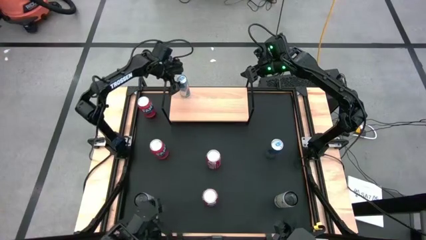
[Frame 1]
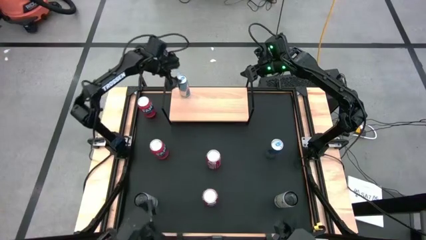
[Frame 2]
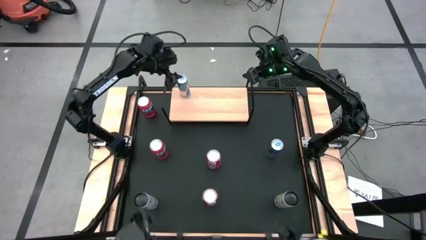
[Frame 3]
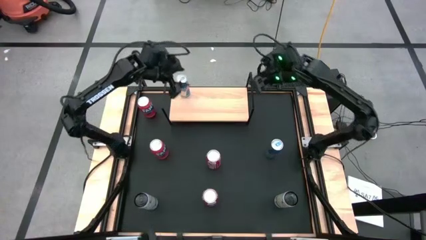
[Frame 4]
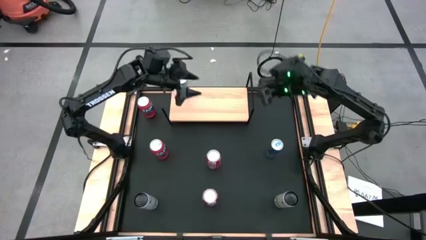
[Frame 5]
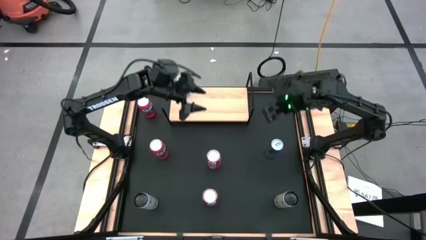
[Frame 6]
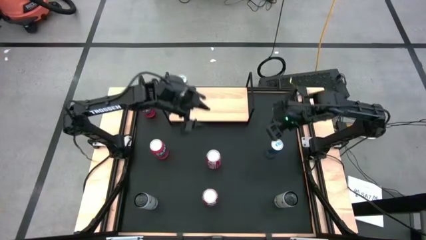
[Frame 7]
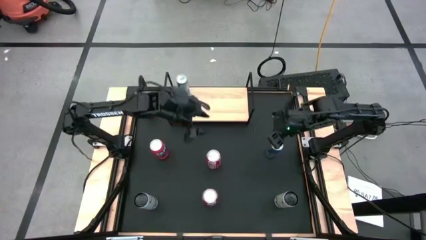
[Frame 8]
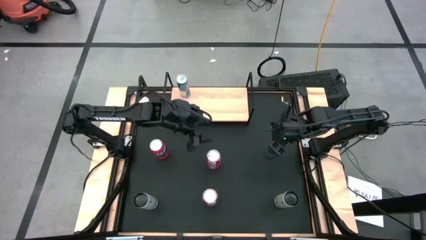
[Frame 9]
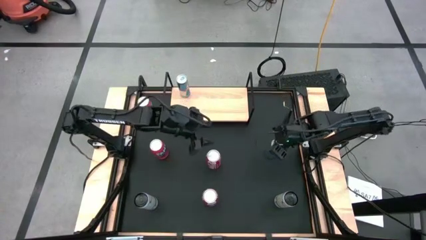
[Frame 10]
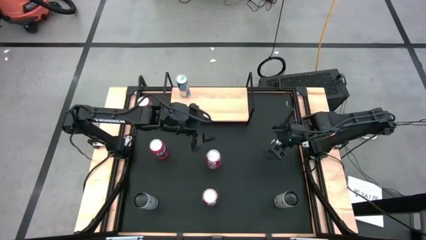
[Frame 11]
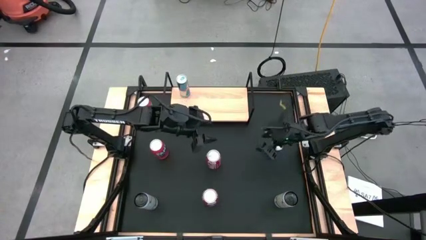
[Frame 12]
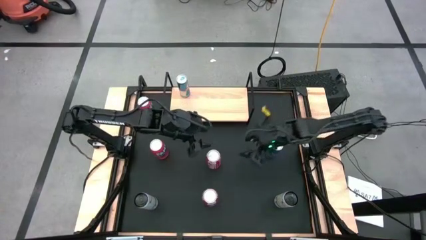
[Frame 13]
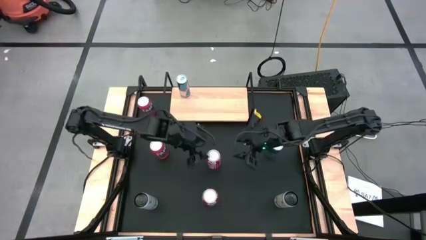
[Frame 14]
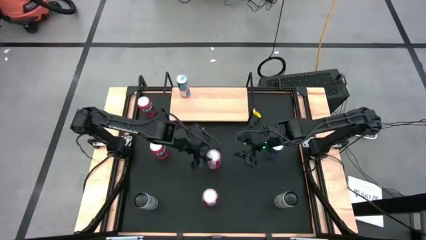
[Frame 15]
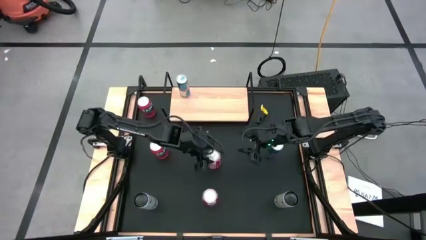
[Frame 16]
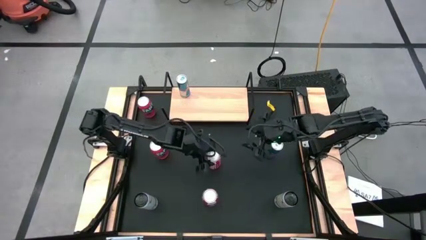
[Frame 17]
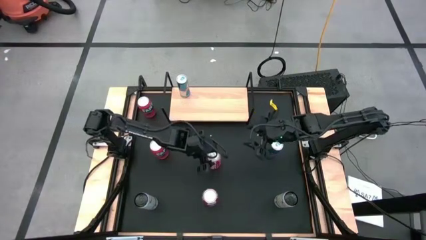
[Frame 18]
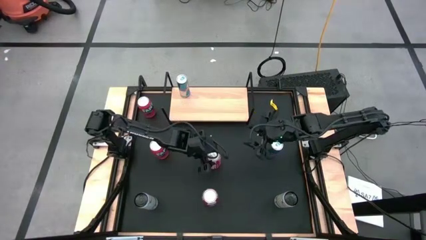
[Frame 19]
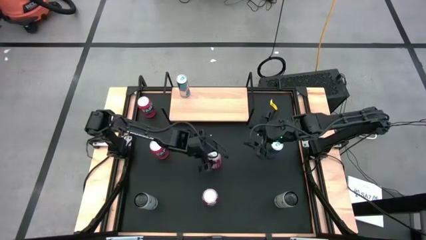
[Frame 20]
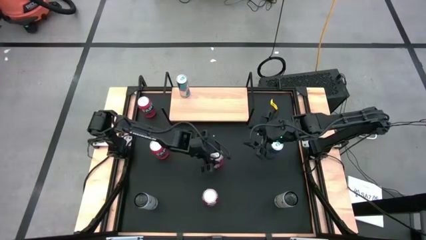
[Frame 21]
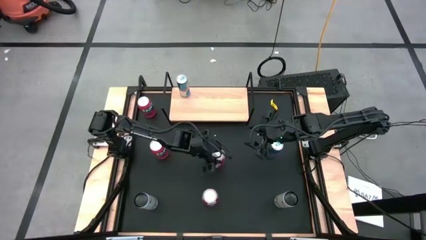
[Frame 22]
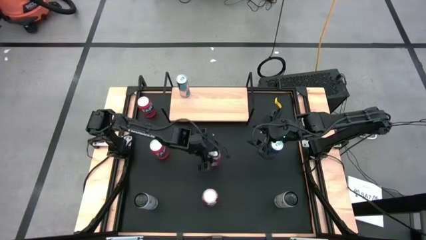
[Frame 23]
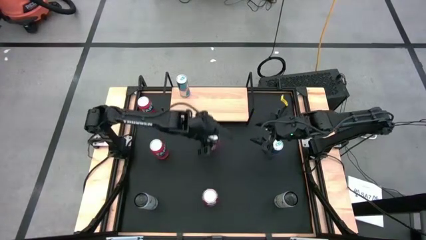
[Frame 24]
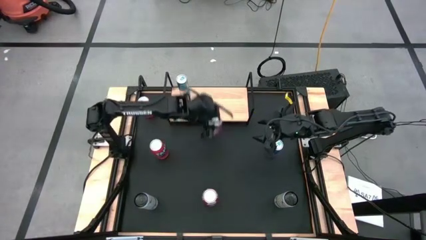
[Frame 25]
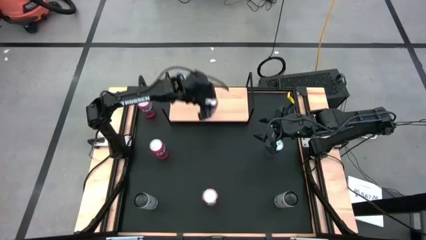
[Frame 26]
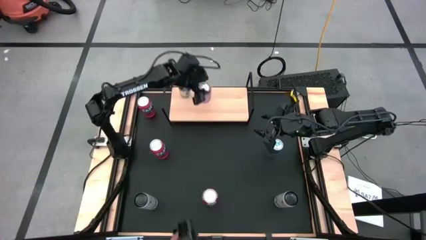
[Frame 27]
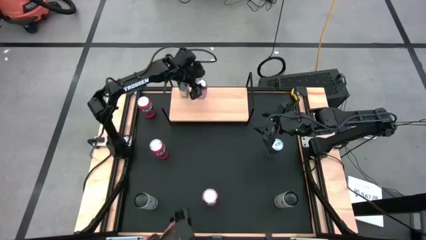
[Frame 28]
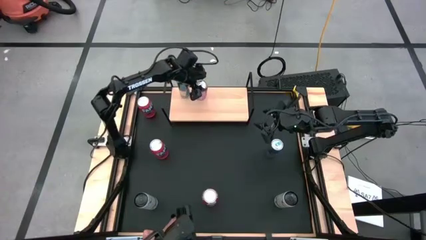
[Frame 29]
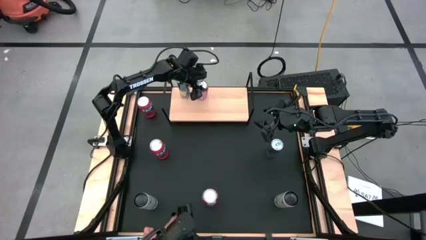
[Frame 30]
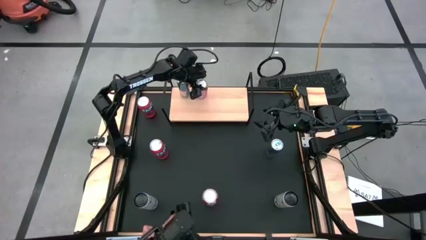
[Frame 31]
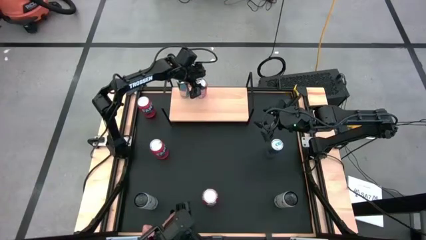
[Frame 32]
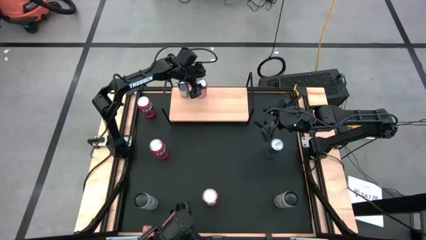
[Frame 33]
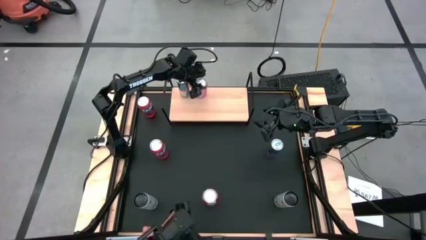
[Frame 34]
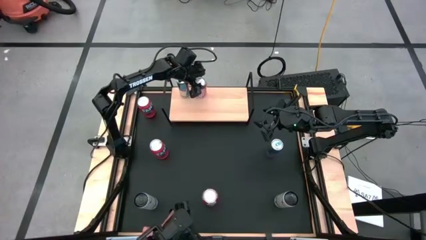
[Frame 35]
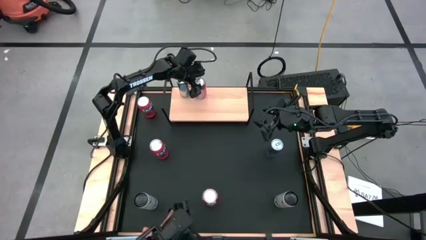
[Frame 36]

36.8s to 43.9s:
Task: Place canned beverage on shelf
Put the top red-black soda can on the shelf

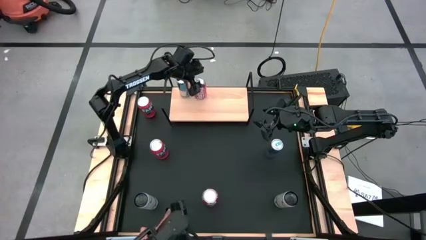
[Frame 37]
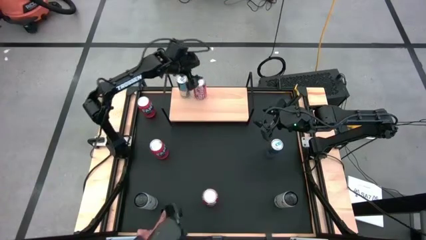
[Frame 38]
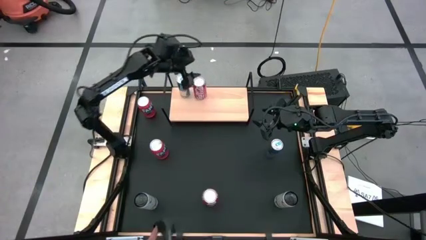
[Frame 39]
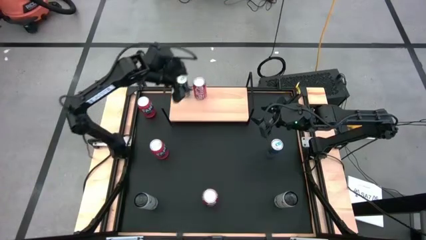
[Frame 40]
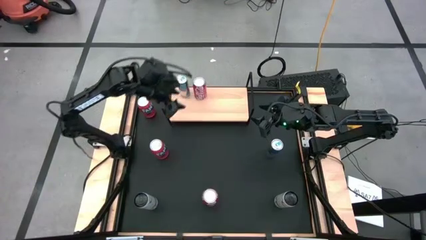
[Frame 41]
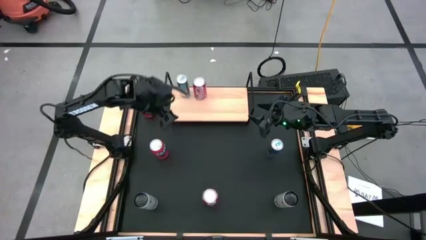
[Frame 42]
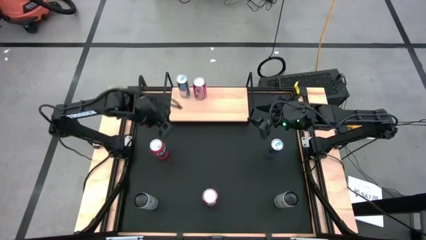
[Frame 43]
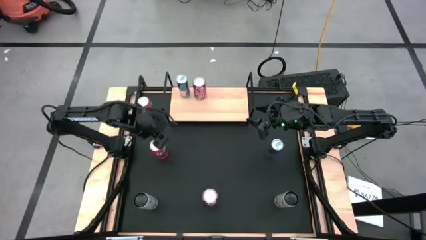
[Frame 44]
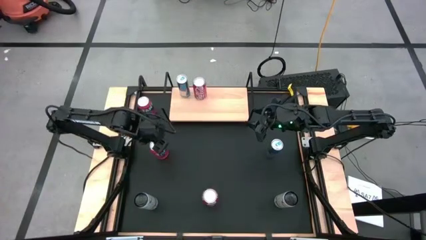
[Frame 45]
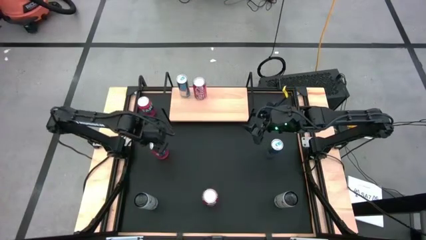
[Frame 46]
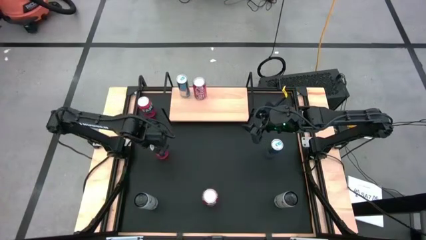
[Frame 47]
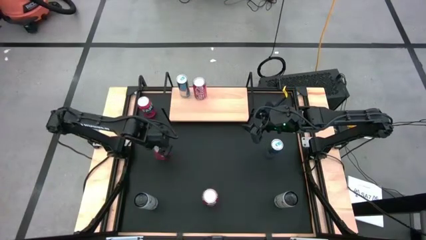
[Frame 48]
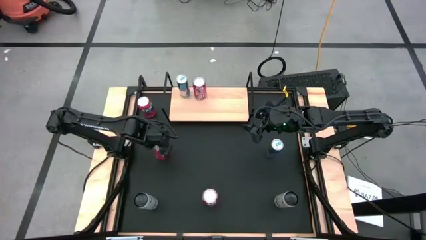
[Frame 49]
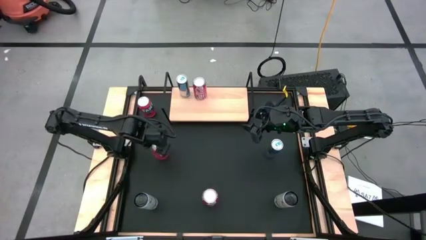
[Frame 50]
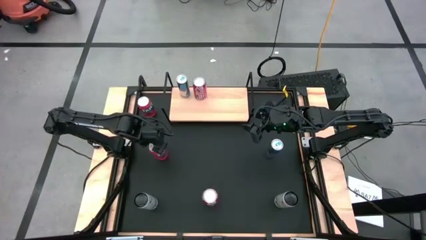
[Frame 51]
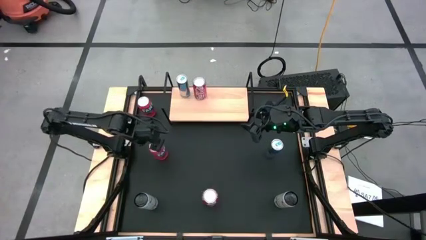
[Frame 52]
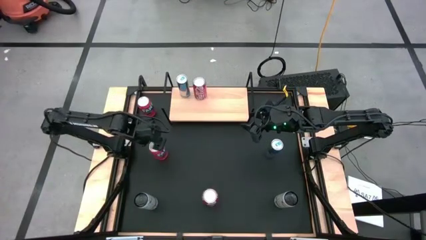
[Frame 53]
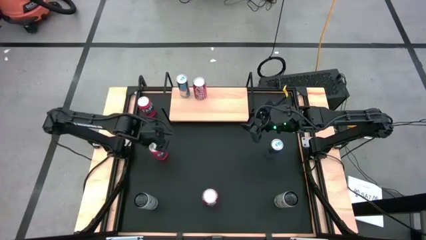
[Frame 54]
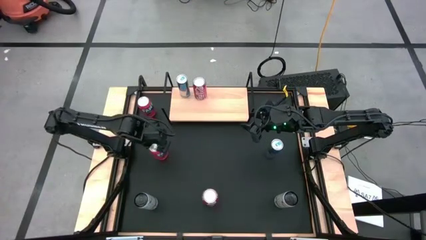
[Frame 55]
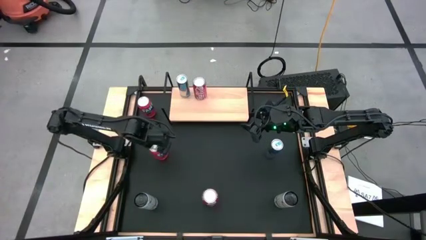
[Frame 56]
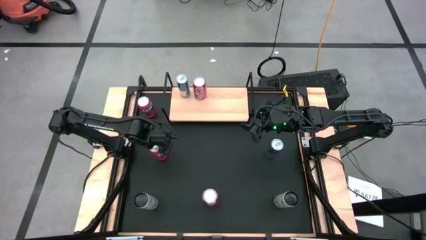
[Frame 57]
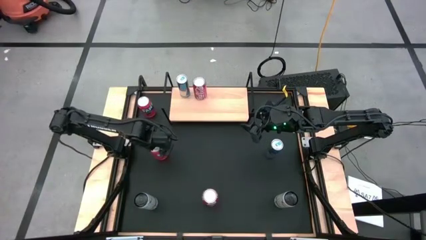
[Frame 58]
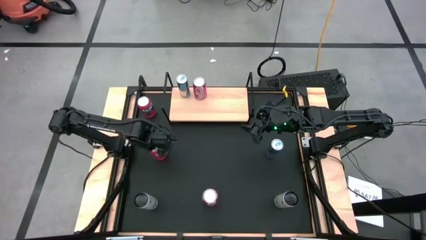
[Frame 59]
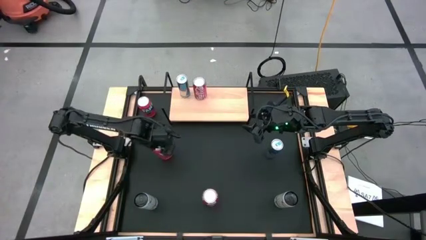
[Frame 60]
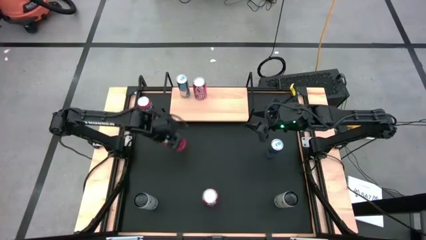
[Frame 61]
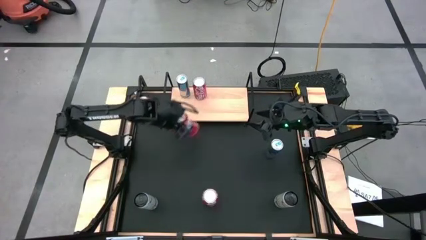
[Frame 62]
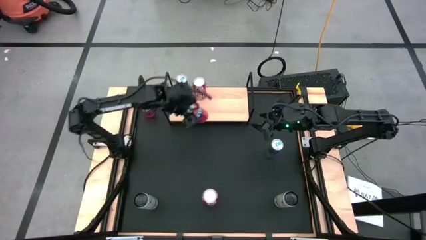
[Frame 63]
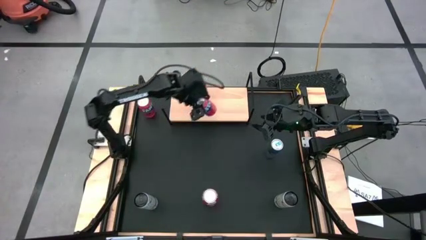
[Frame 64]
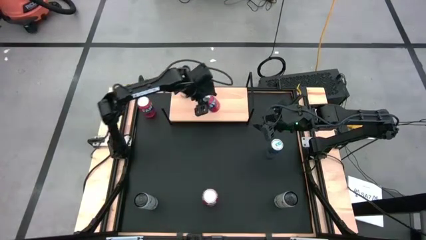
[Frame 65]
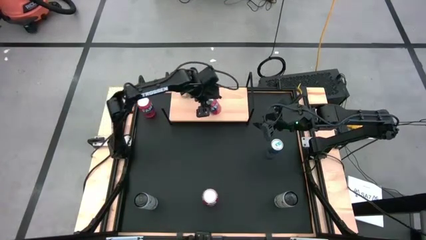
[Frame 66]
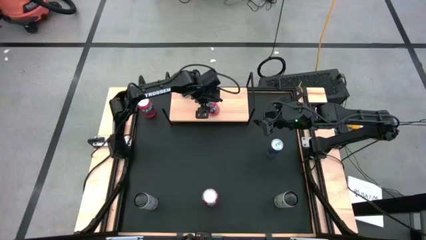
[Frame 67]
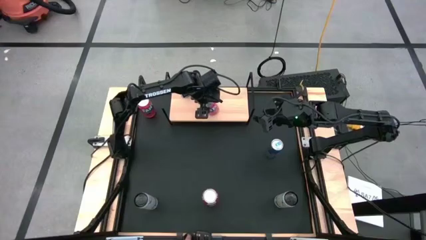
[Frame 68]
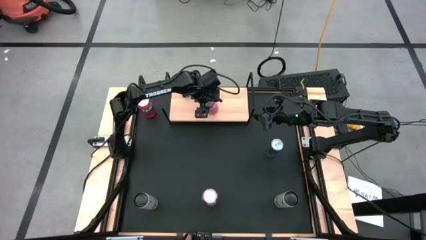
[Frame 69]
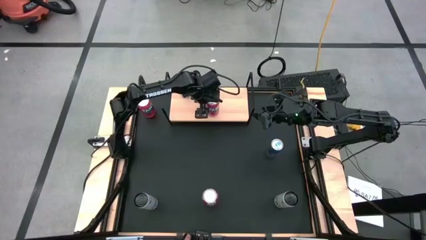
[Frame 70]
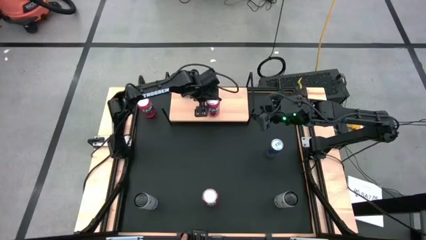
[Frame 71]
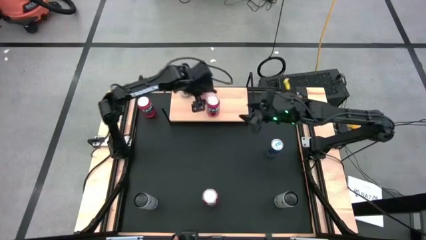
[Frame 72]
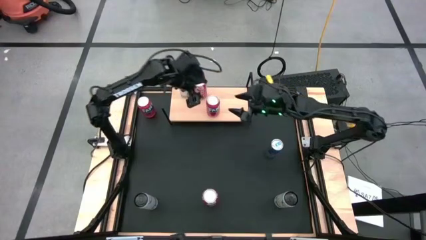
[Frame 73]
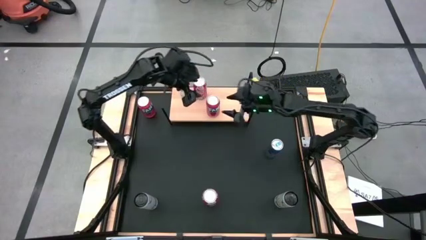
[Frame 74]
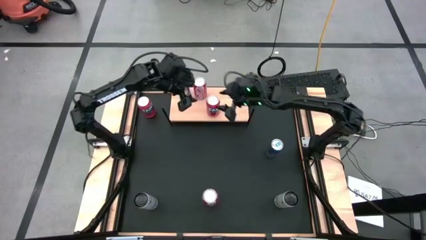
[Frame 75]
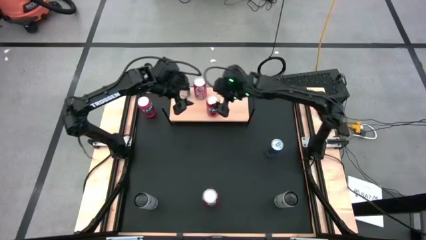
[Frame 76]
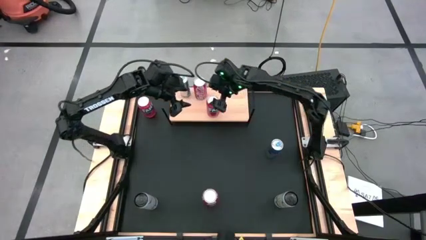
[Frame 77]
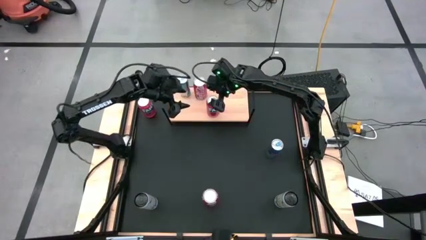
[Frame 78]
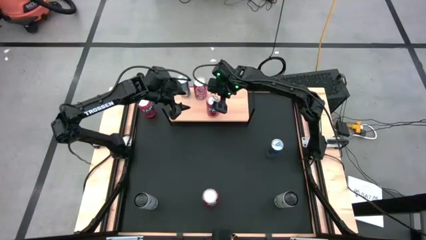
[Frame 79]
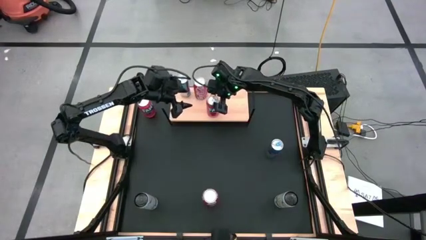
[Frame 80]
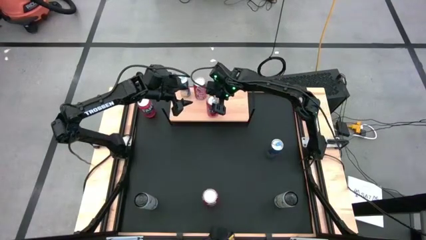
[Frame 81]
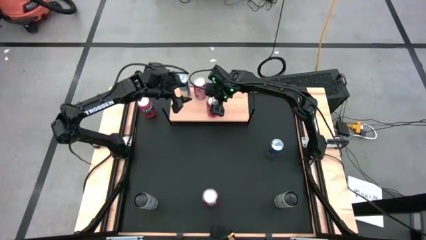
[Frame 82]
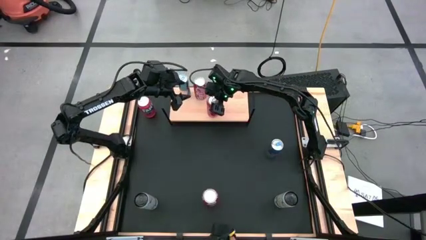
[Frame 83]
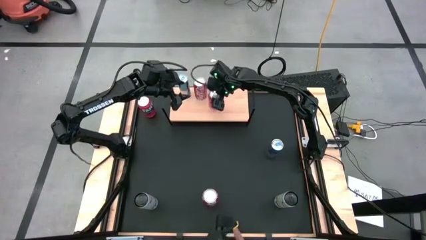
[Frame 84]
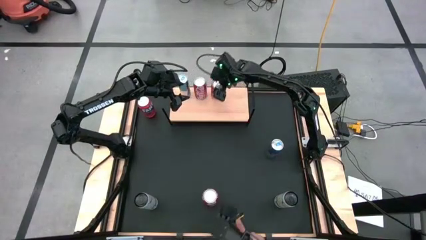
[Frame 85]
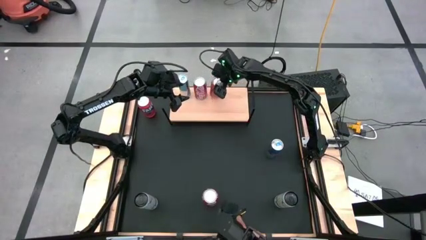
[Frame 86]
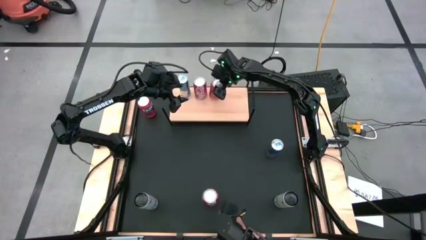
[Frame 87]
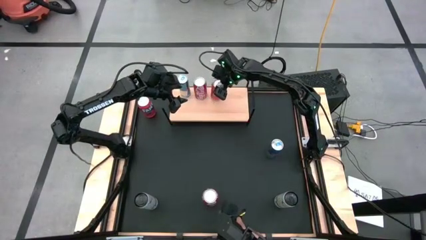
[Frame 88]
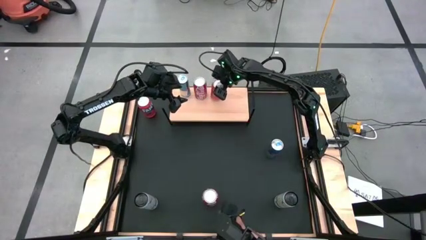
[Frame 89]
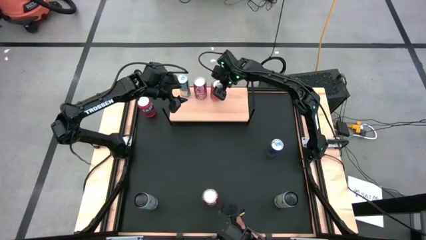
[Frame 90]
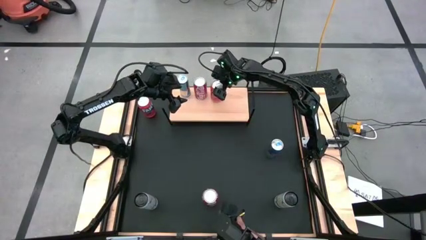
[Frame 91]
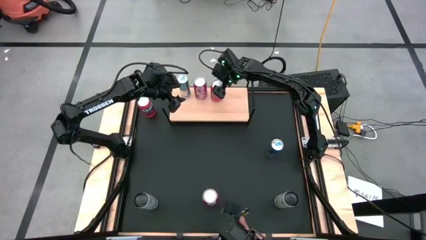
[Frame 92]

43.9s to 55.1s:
Put the bottom red soda can on the shelf
